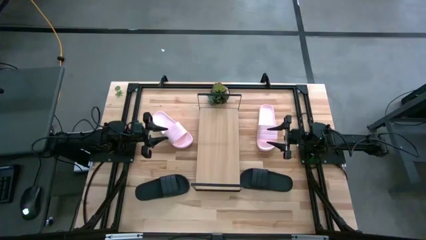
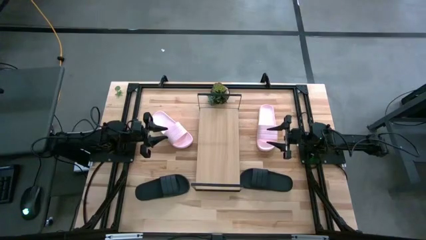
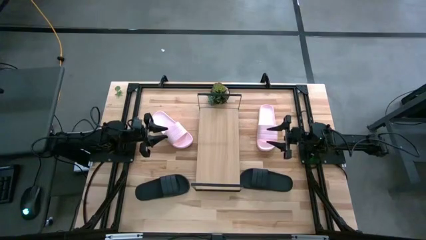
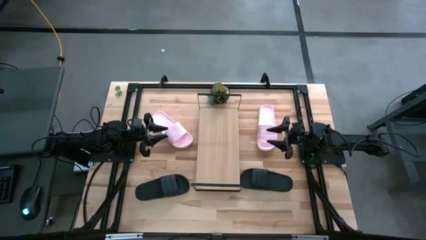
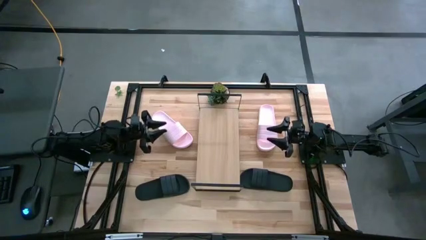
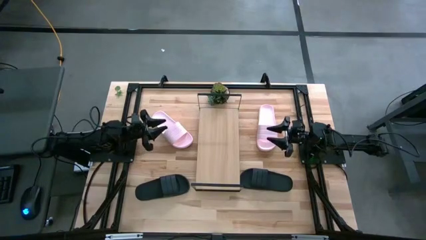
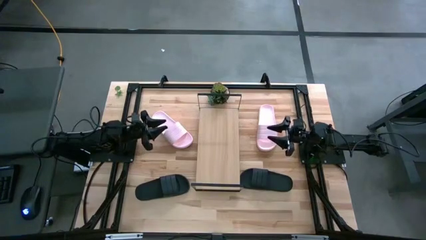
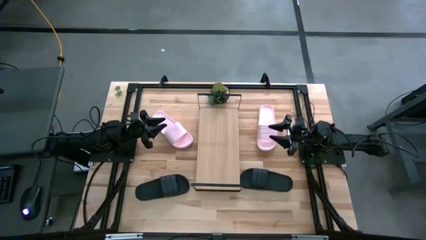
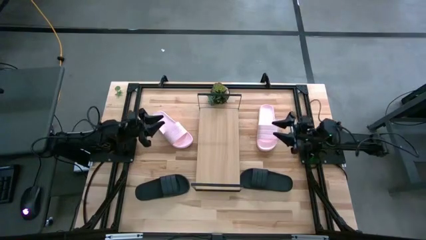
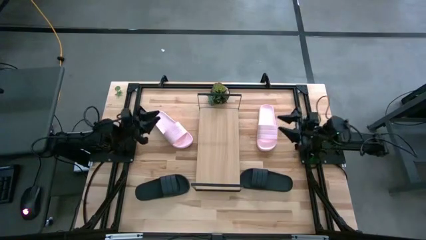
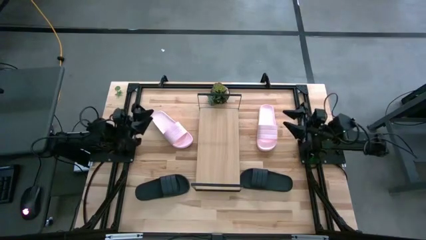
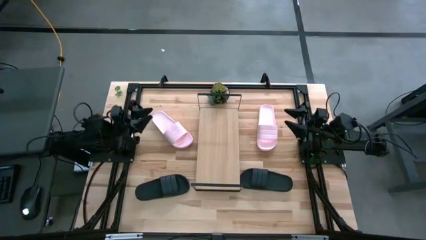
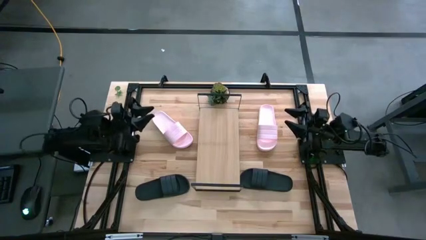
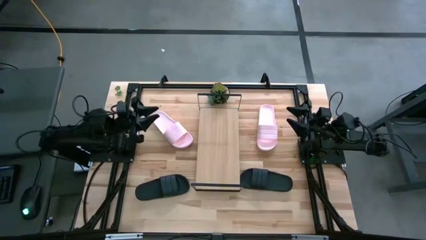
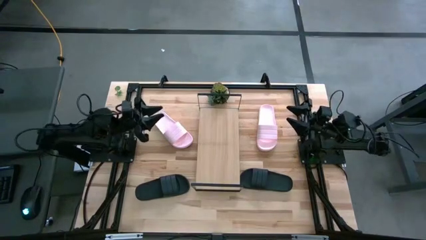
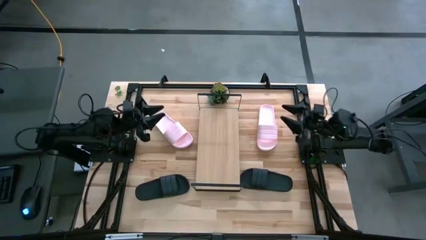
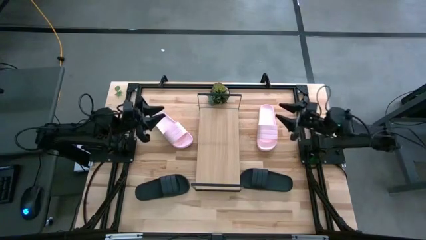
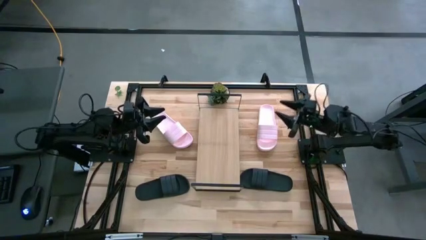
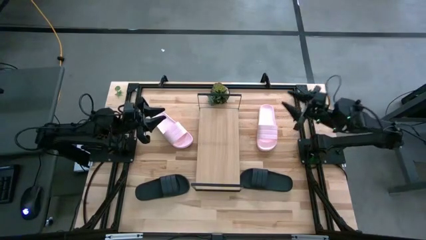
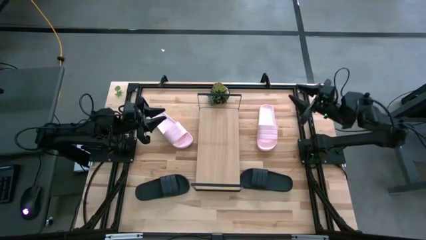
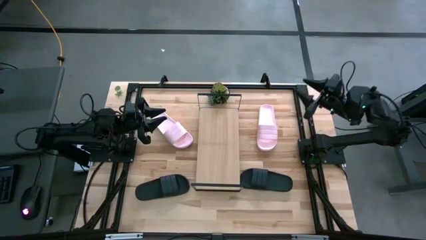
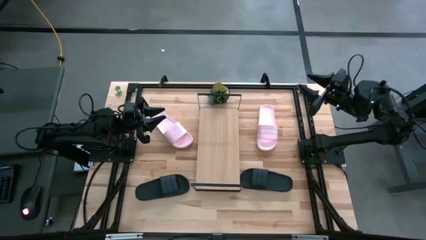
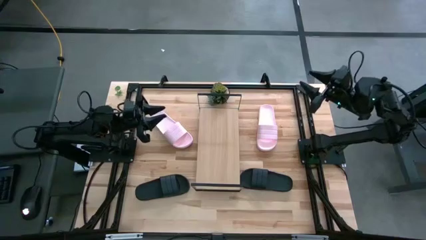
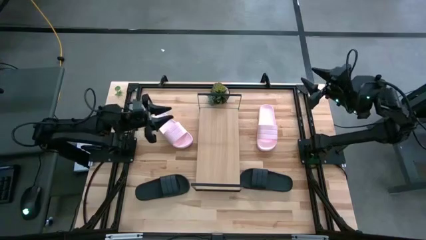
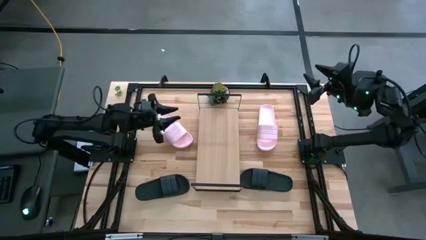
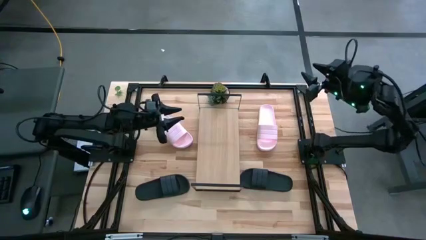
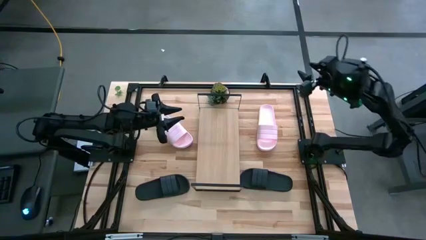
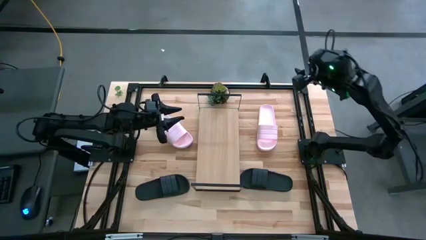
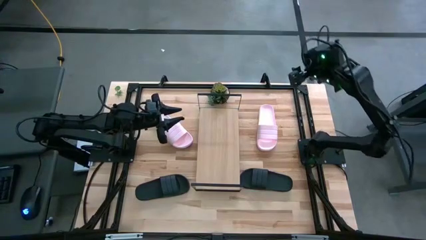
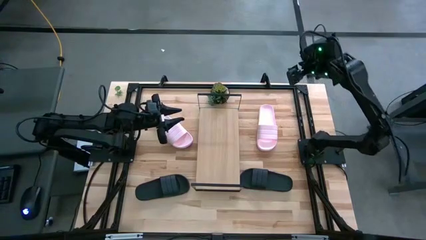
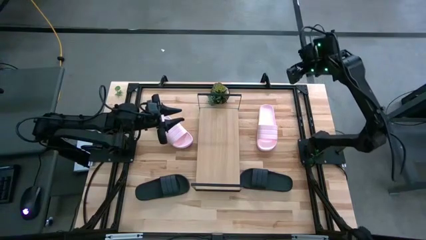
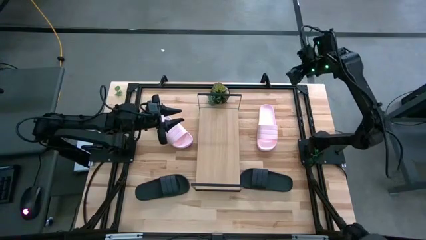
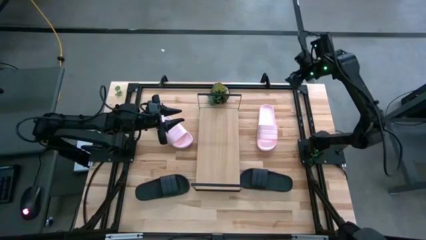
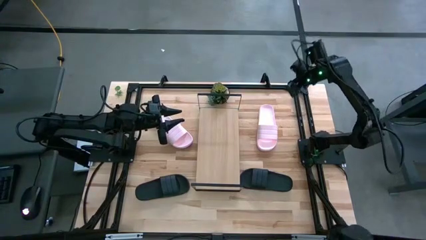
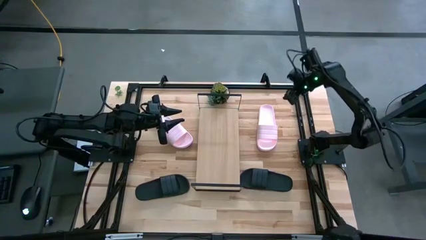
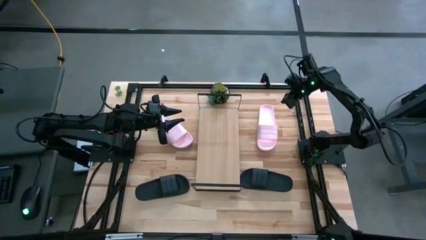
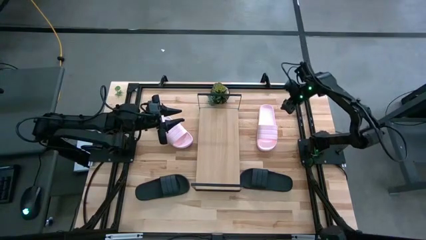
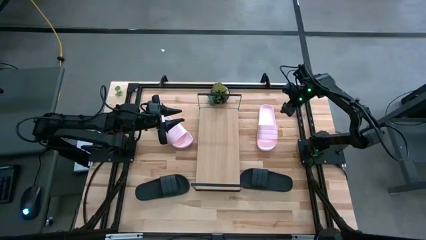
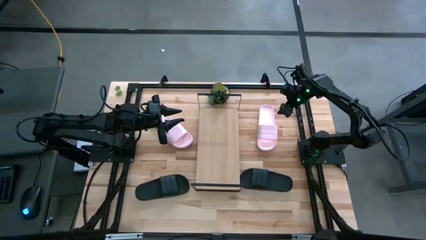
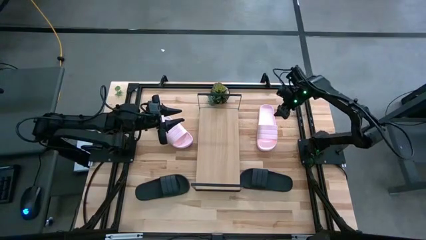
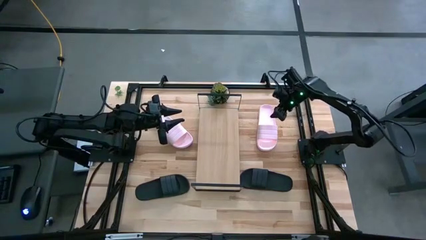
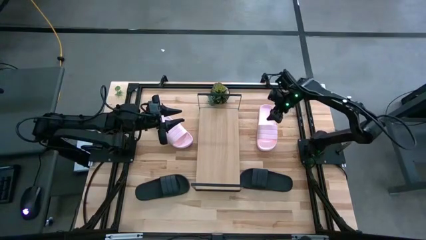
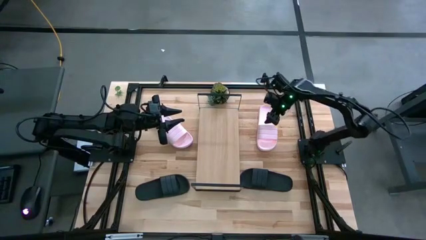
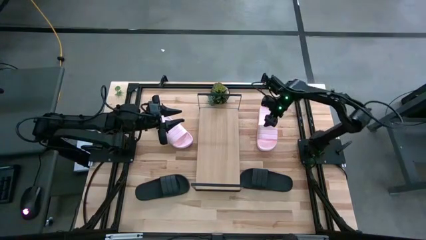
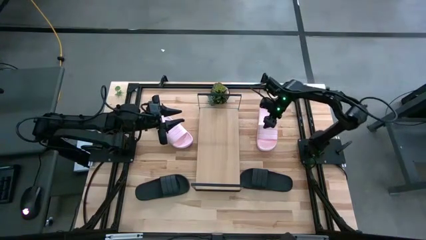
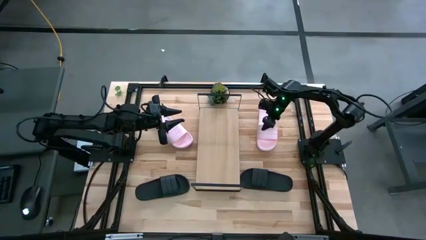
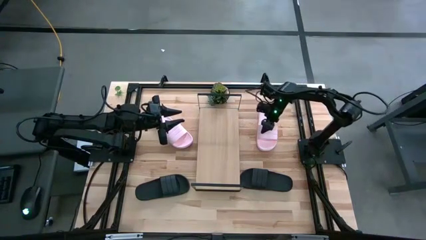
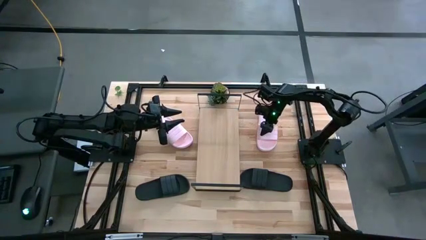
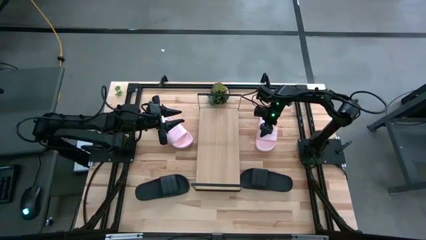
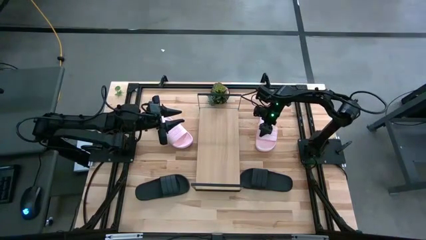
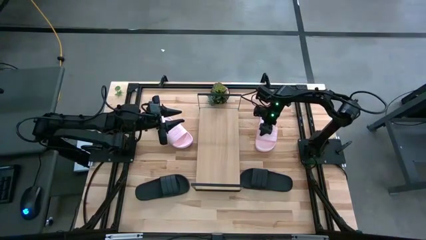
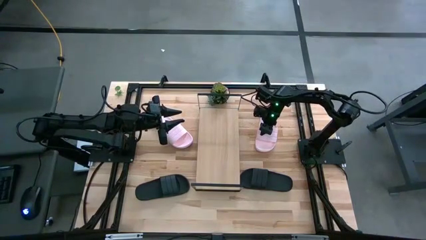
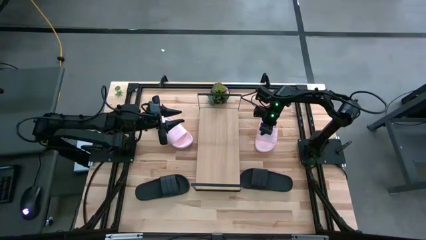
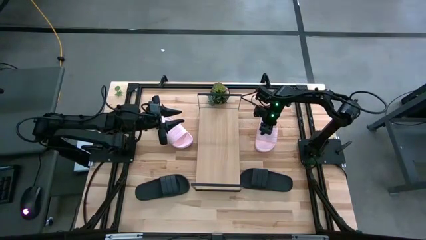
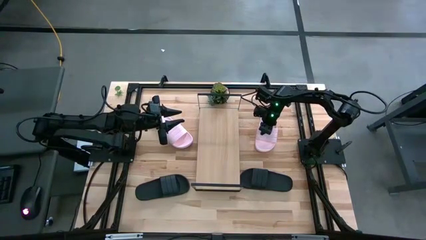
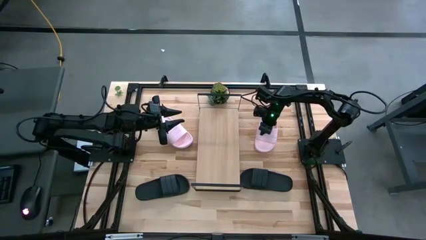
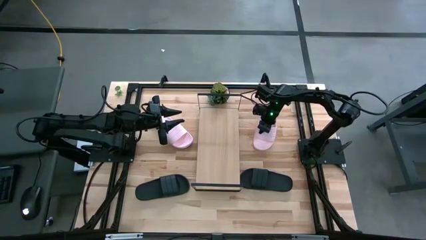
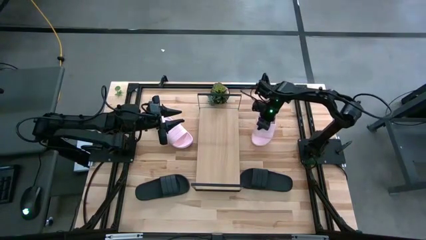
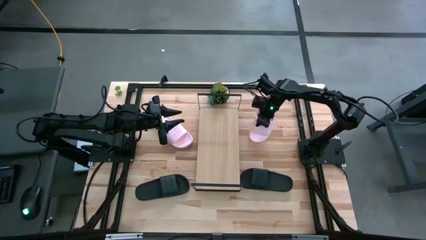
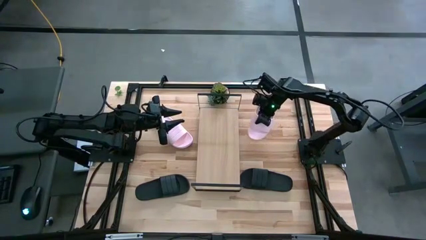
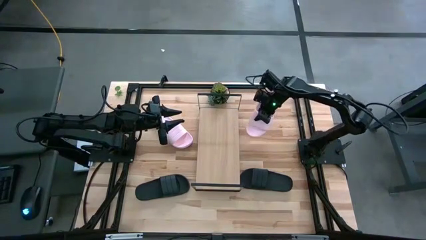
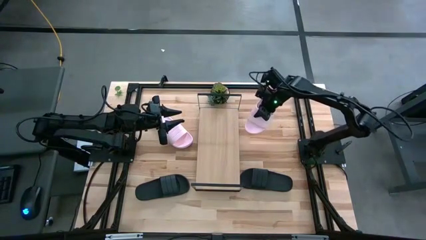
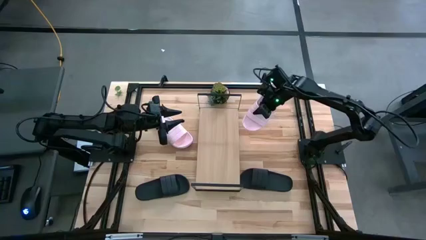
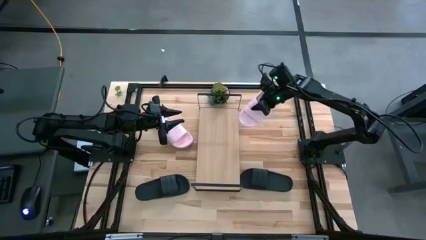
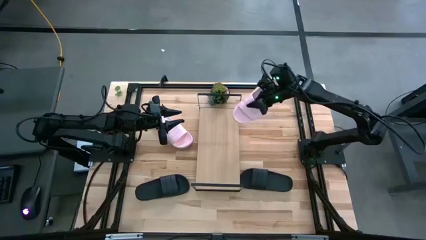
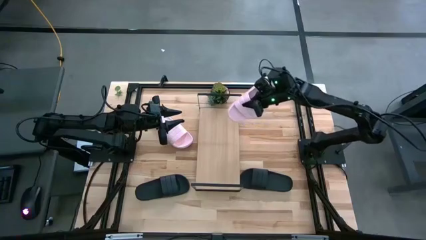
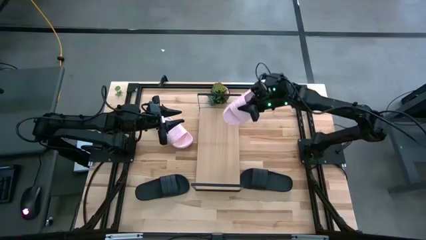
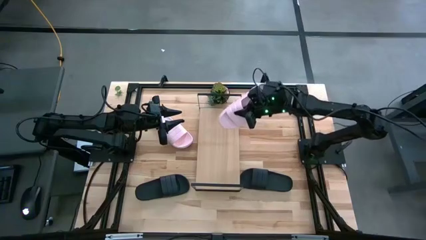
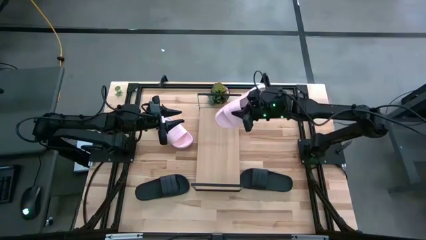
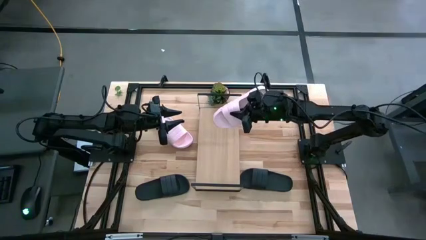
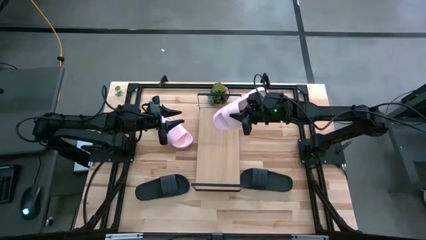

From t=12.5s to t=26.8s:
Task: Pick and place slides into the shelf
Put the right pink slide on the shelf
